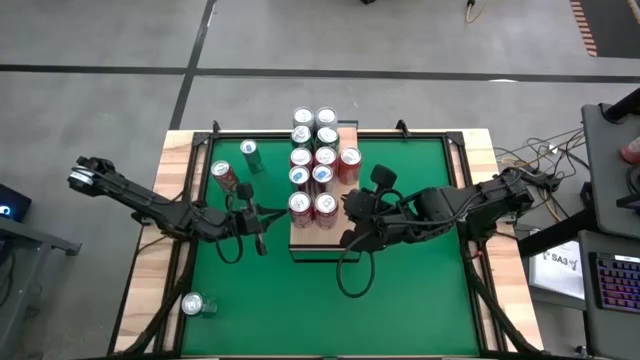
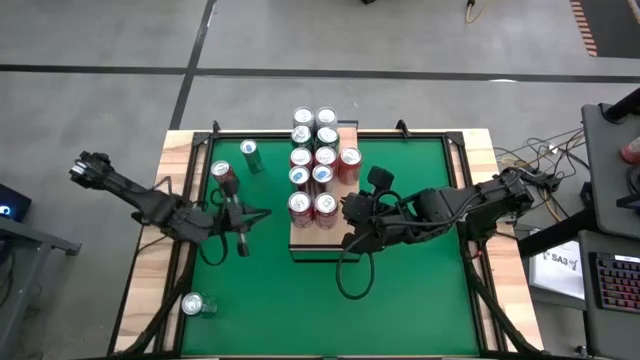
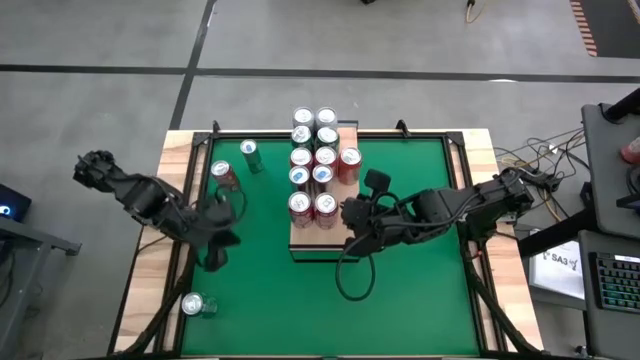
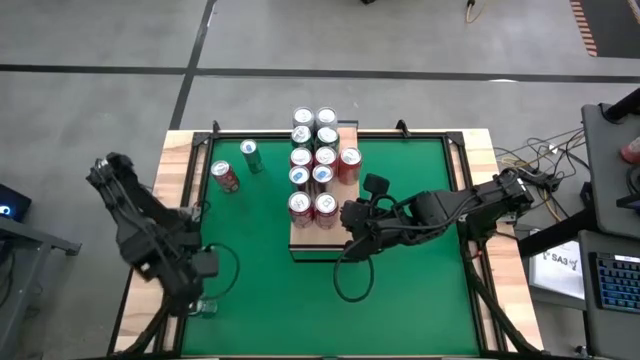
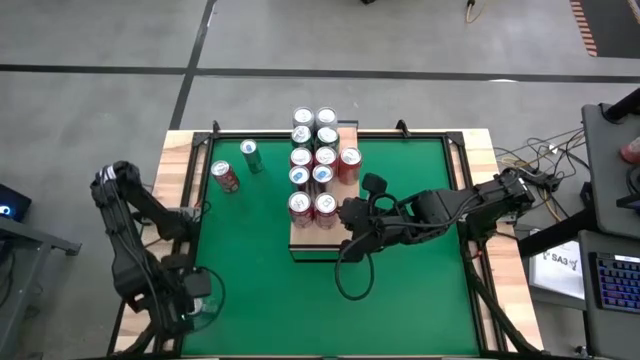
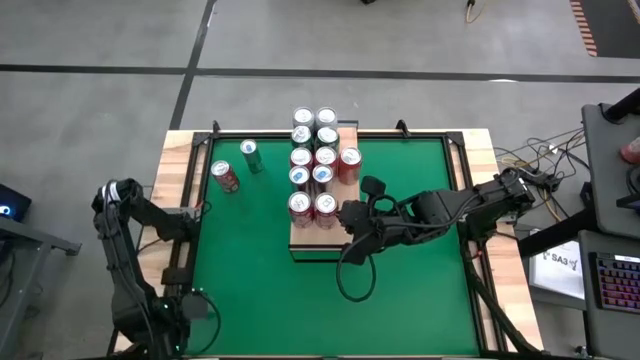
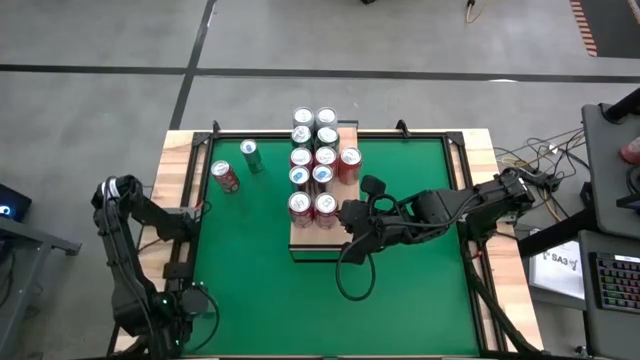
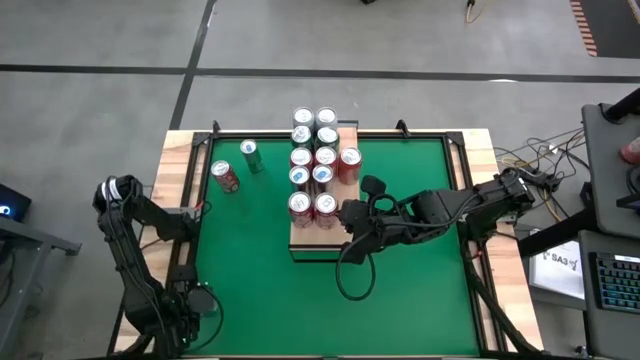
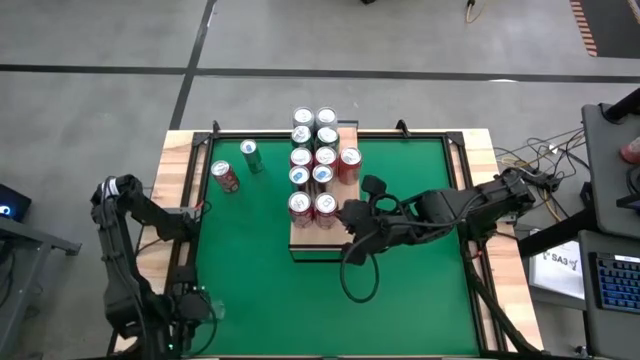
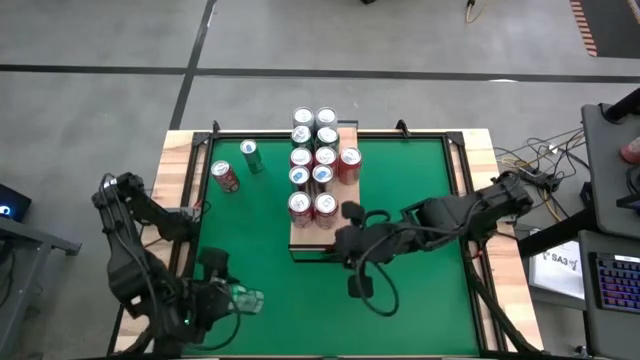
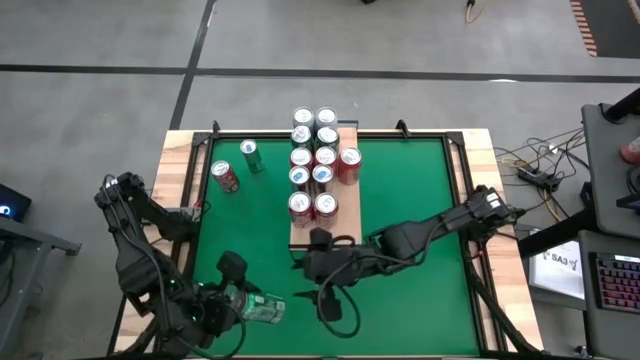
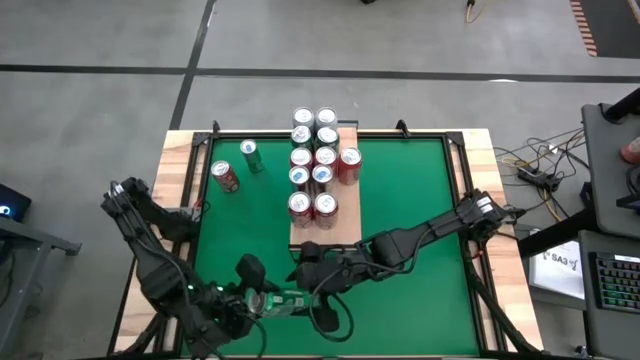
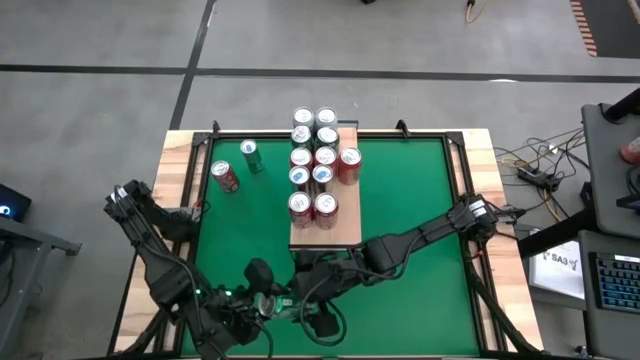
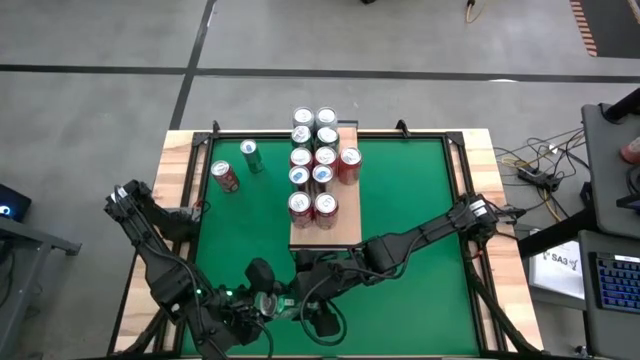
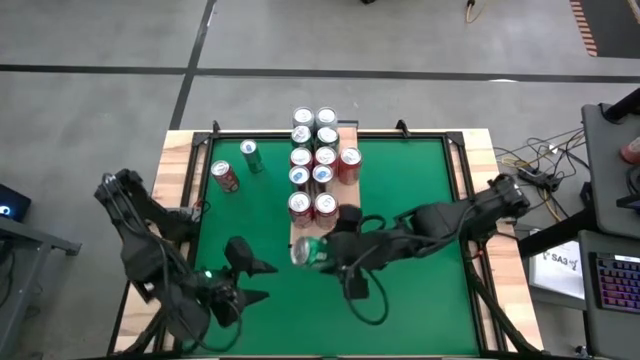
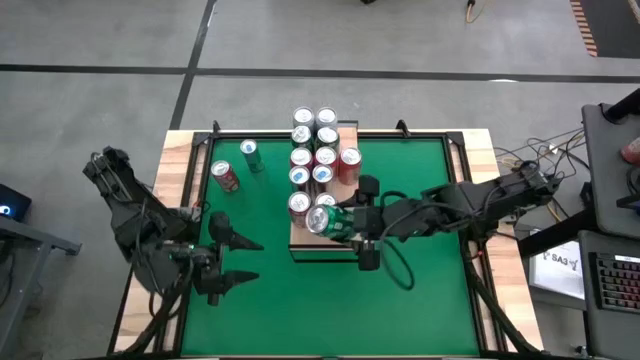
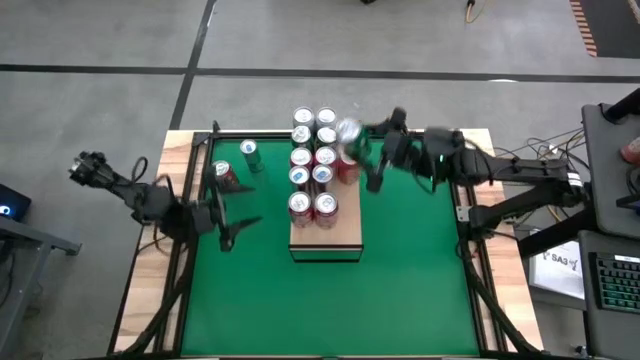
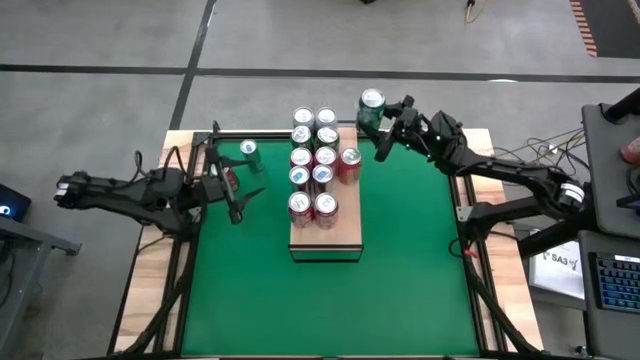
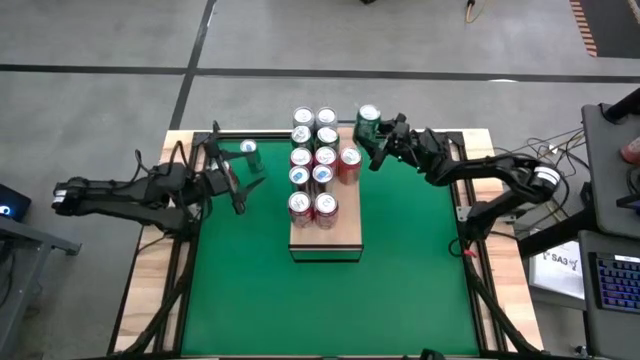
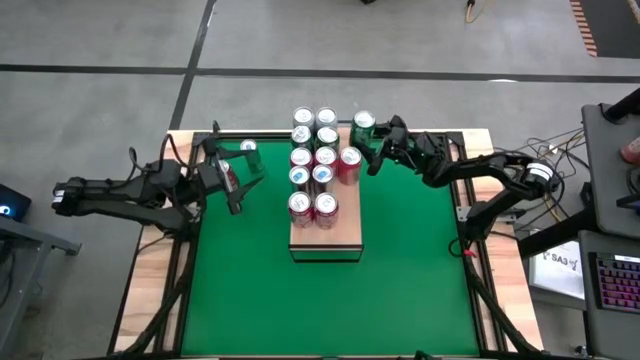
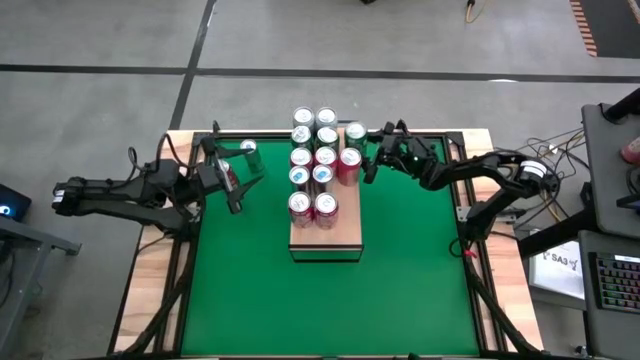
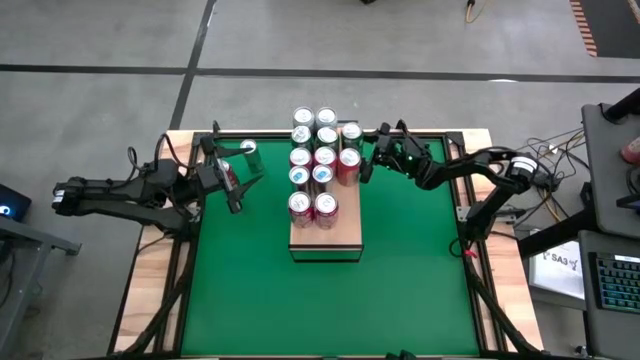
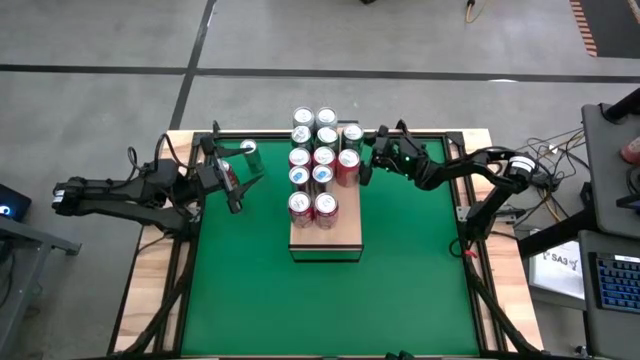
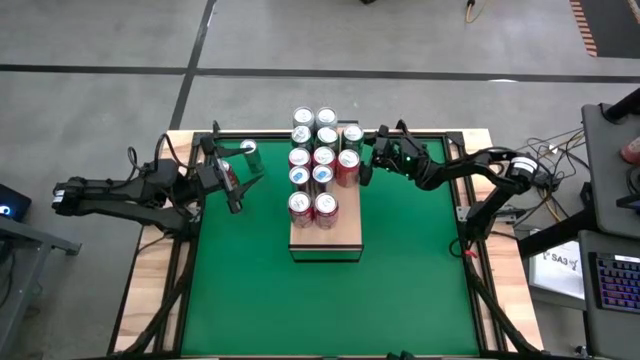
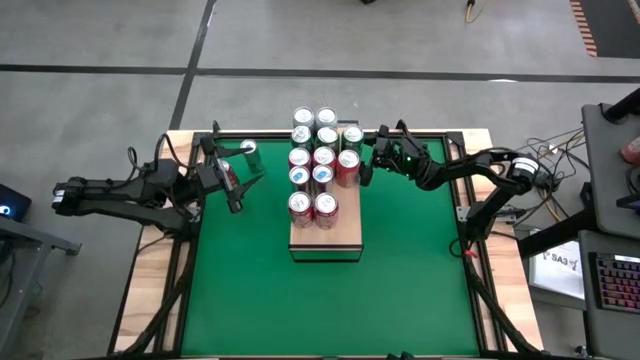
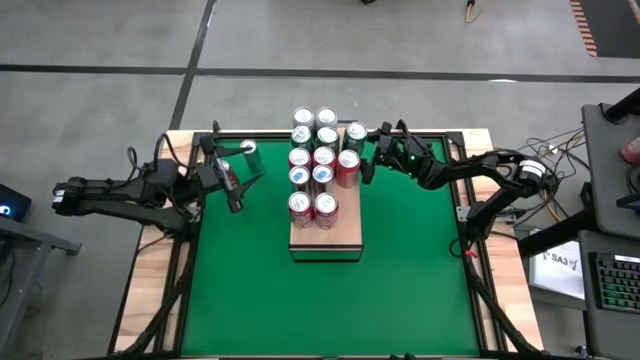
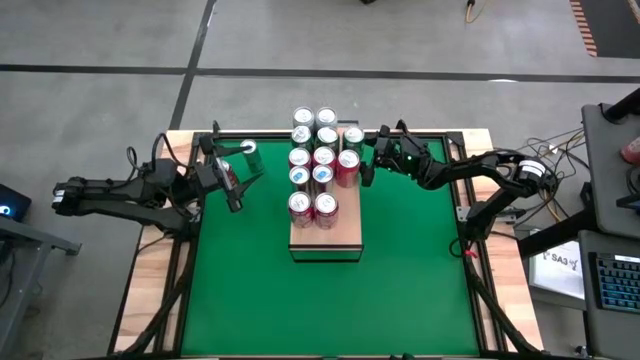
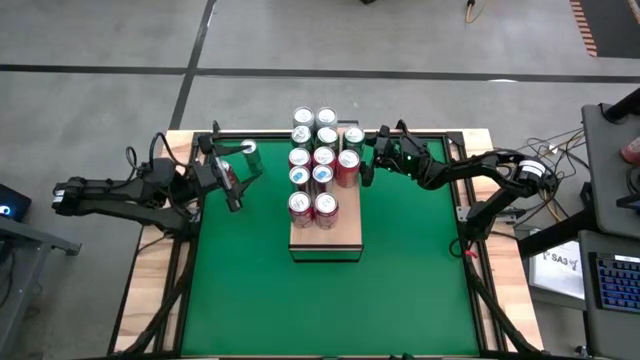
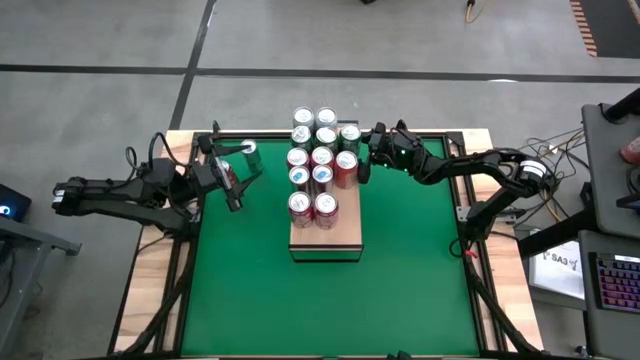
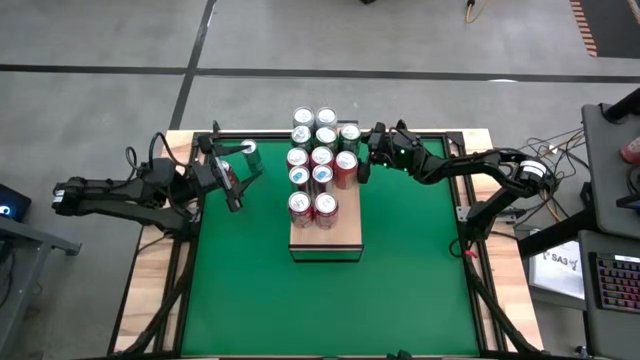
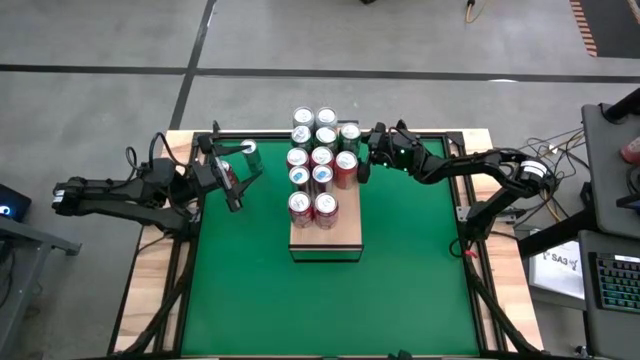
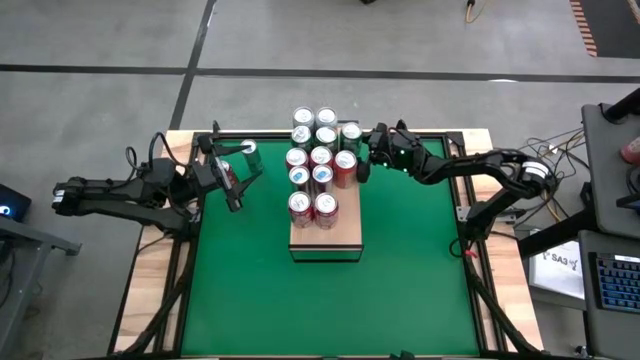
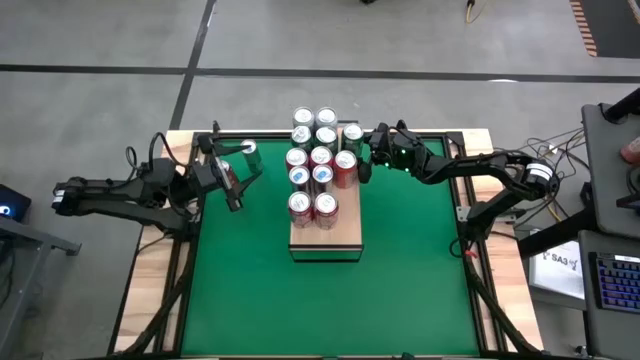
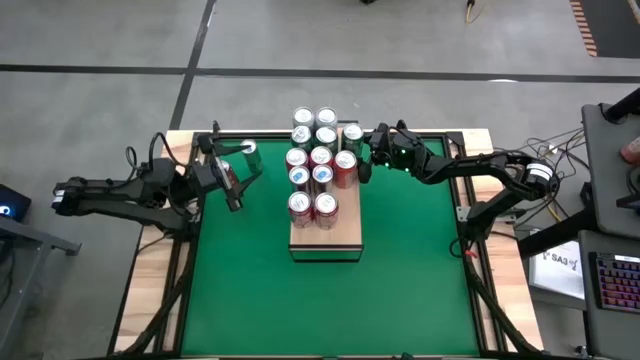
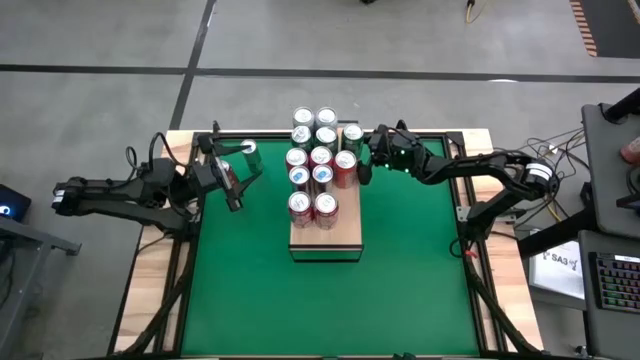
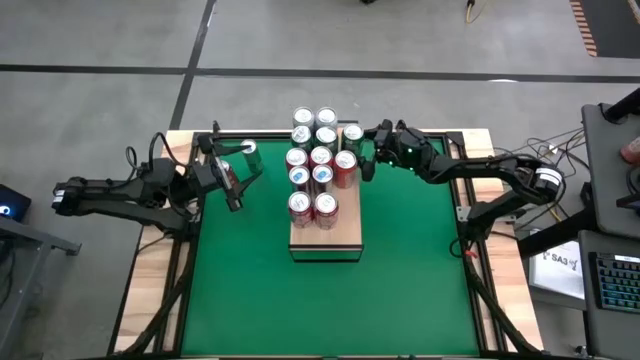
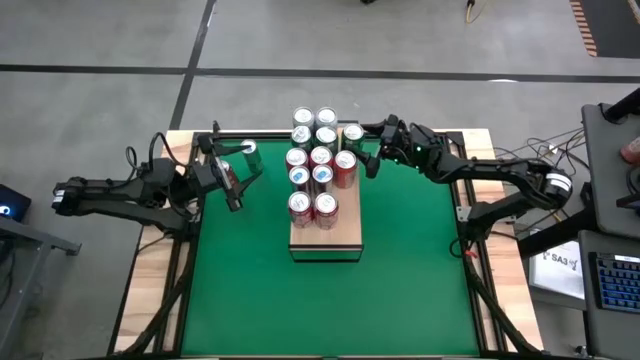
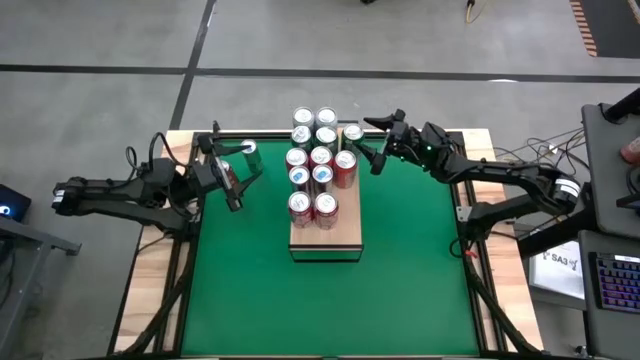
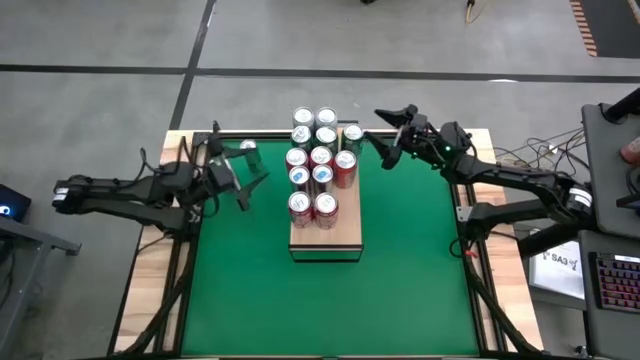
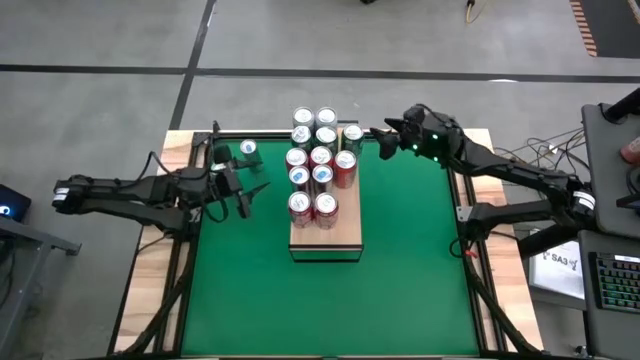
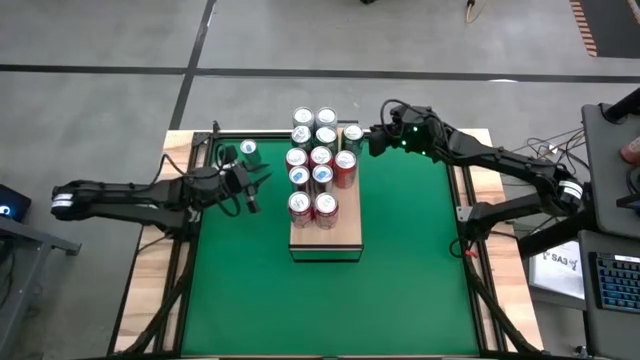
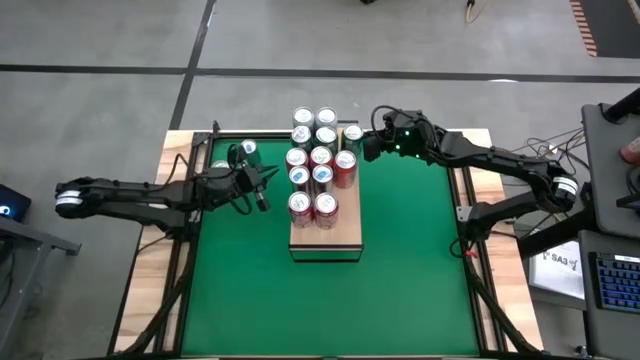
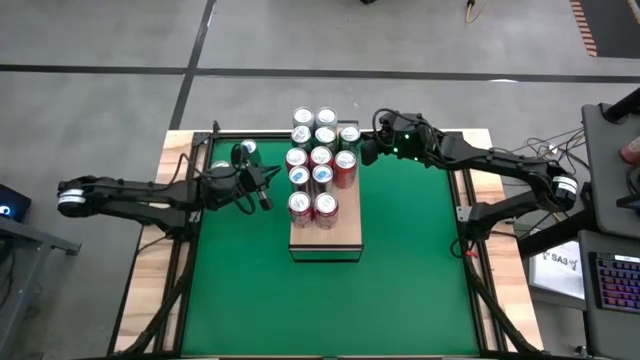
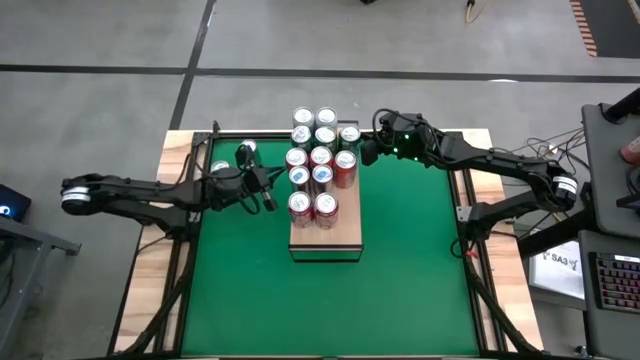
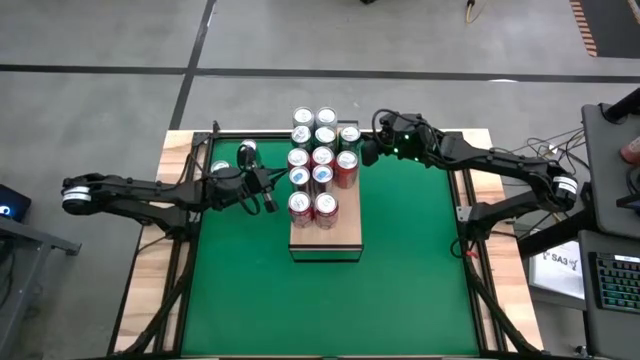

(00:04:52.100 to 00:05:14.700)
Task: Place canned beverage on shelf
Put the green can on the shelf
